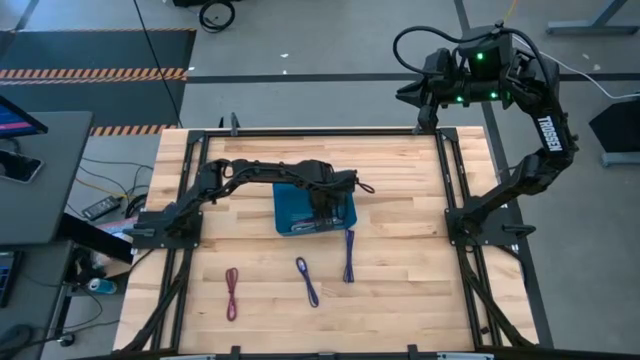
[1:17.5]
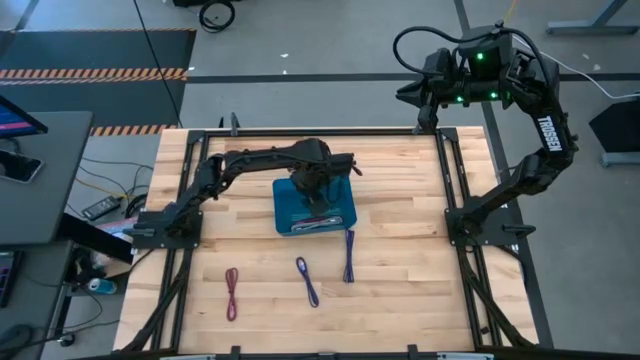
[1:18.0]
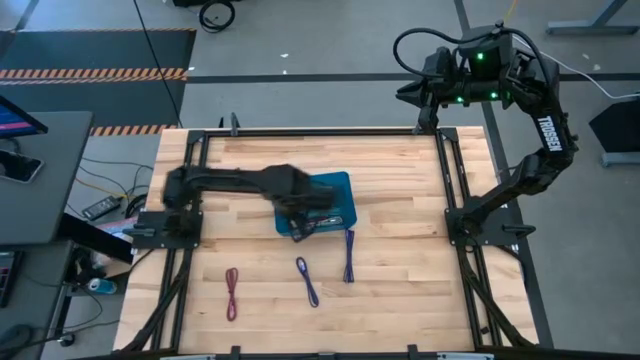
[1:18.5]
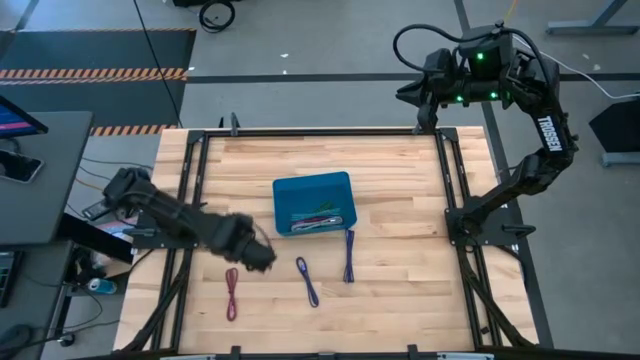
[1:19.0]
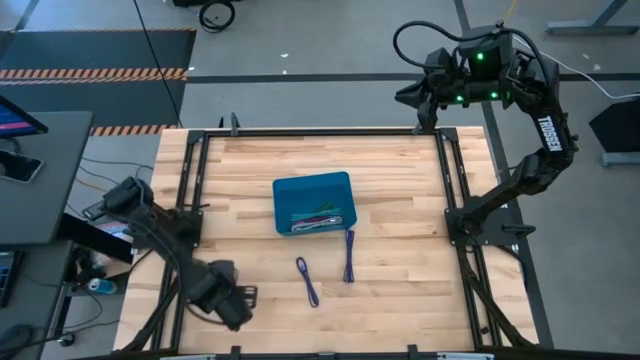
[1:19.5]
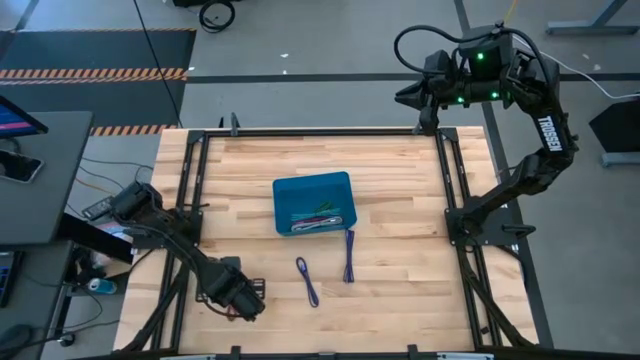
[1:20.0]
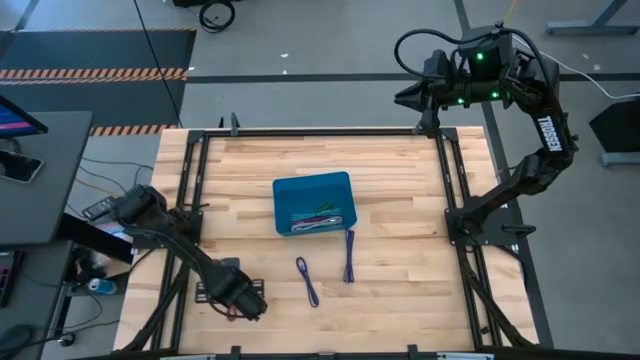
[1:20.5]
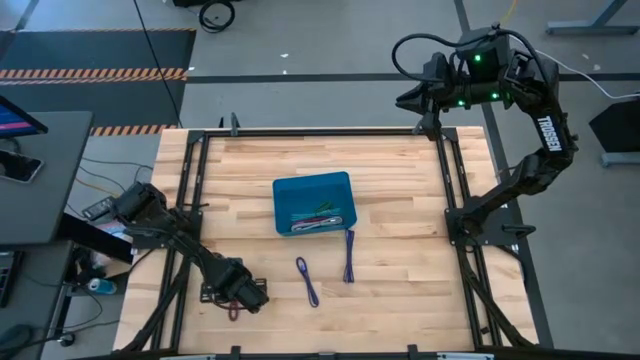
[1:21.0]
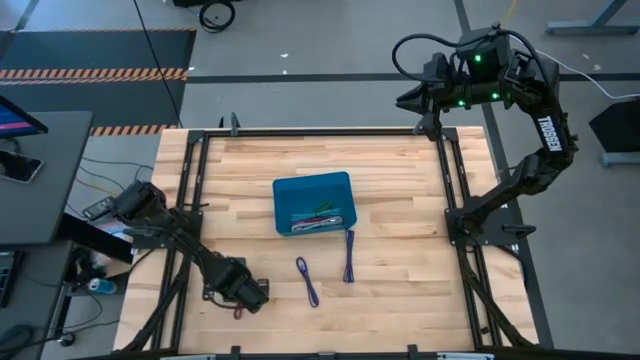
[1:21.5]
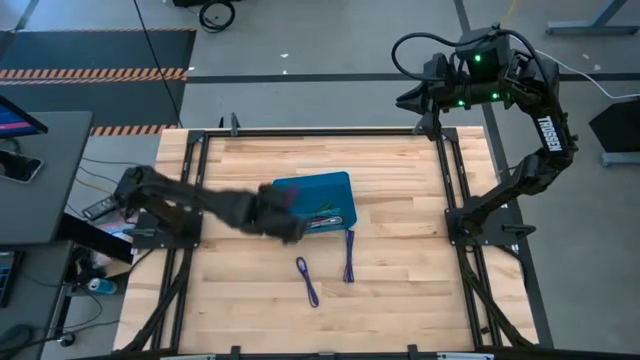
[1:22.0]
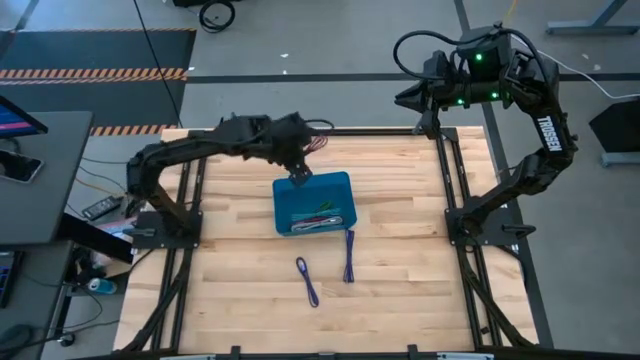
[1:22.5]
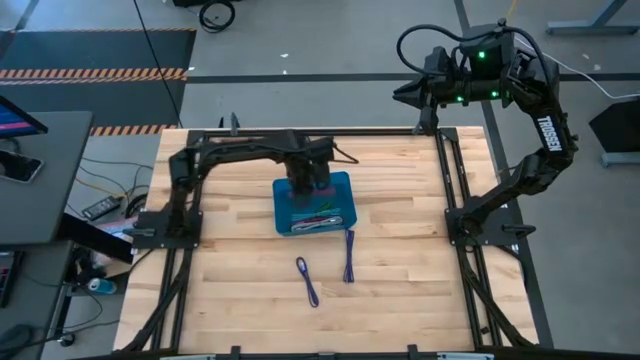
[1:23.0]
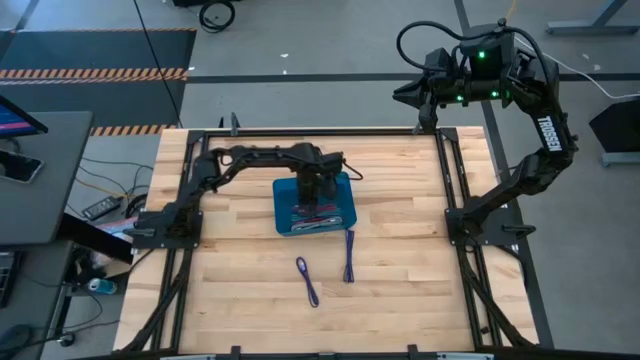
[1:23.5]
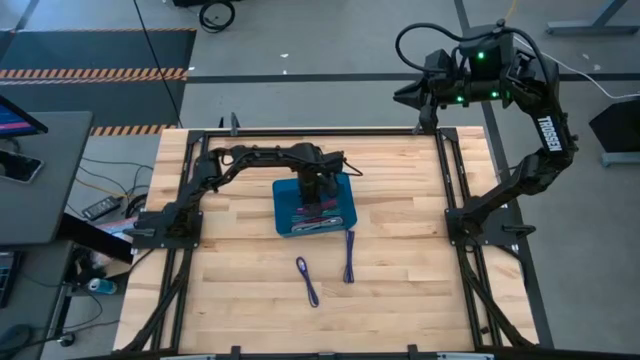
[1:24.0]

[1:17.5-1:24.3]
Task: Pick and place USB-C Cables
Put the black pink charger cable into the blue bin

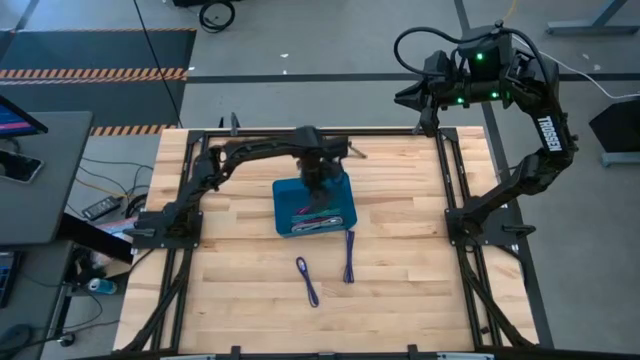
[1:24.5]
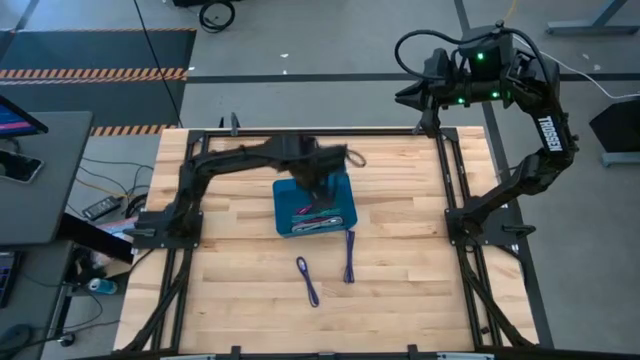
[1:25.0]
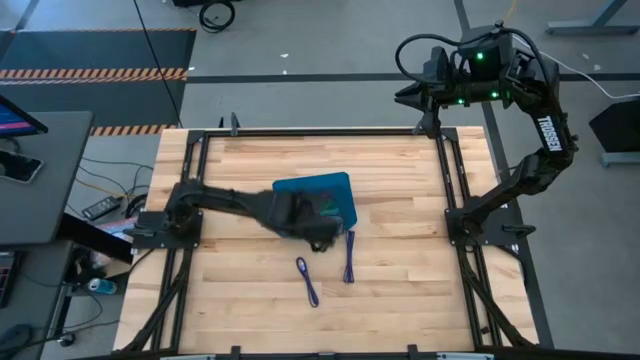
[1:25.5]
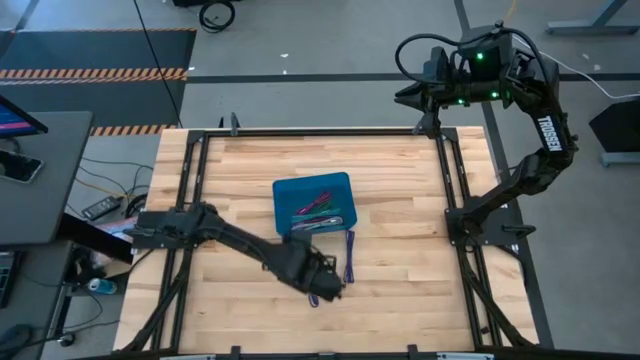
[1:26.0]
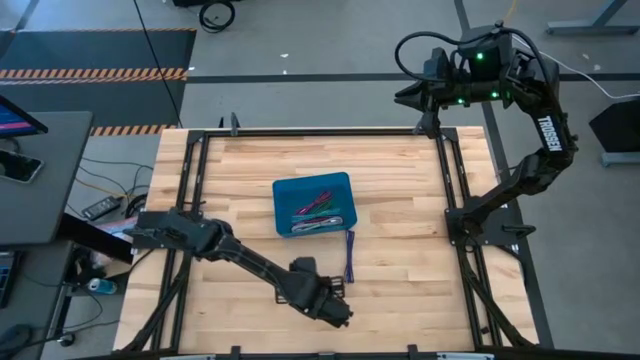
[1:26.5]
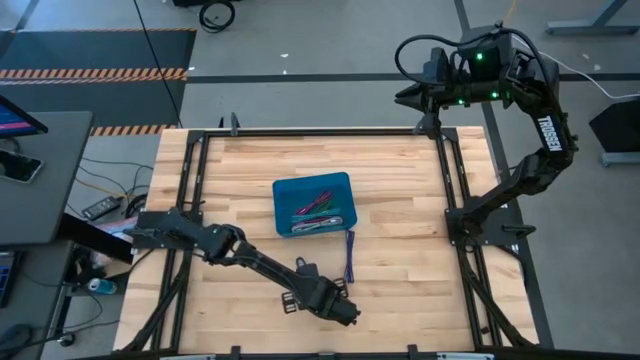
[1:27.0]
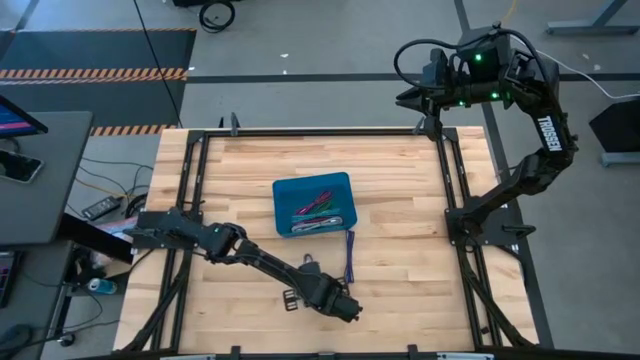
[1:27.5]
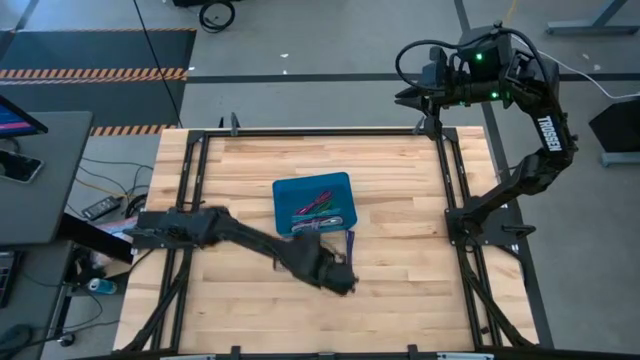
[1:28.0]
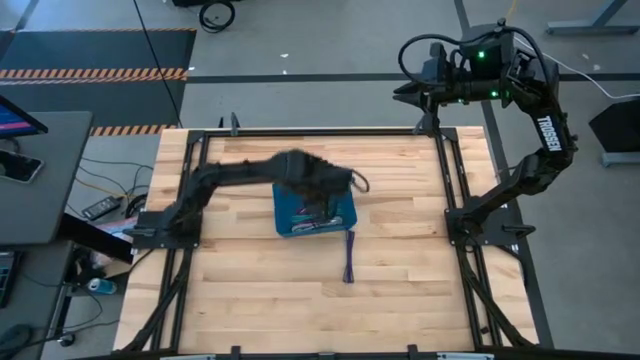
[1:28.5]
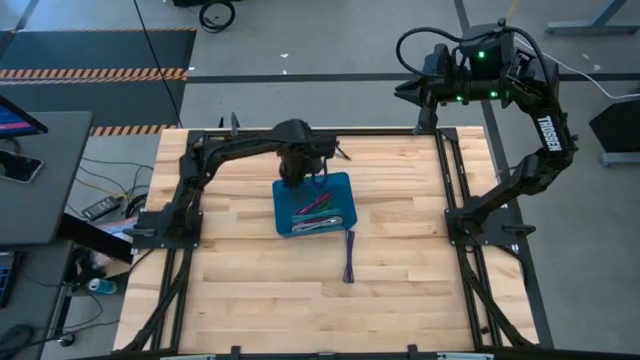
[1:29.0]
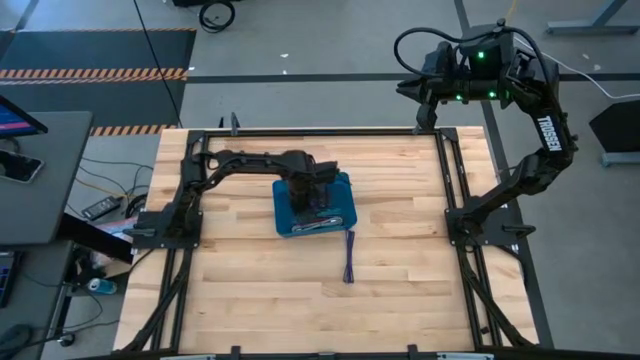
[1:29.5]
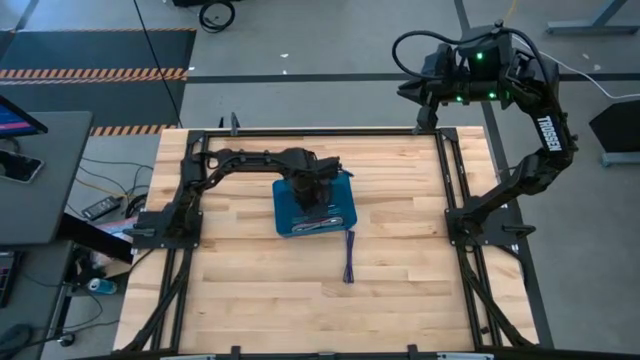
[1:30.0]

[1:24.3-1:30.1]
Put the left black purple charger cable into the blue bin

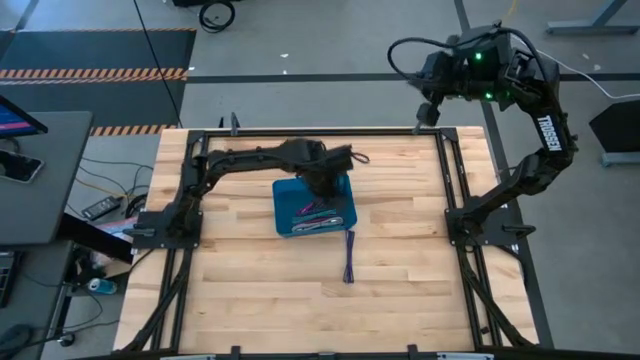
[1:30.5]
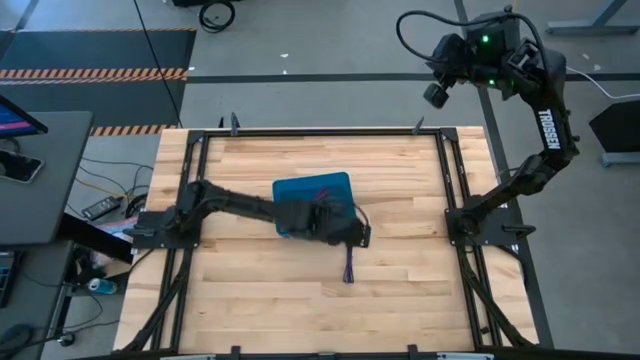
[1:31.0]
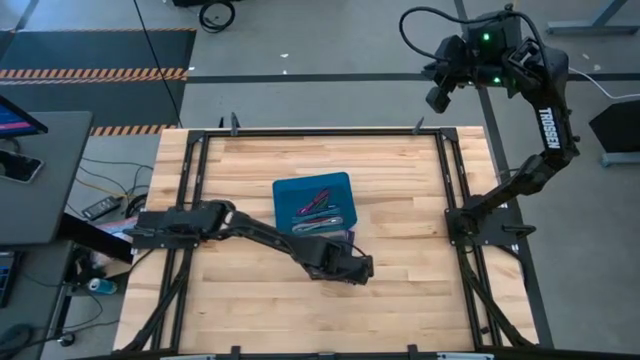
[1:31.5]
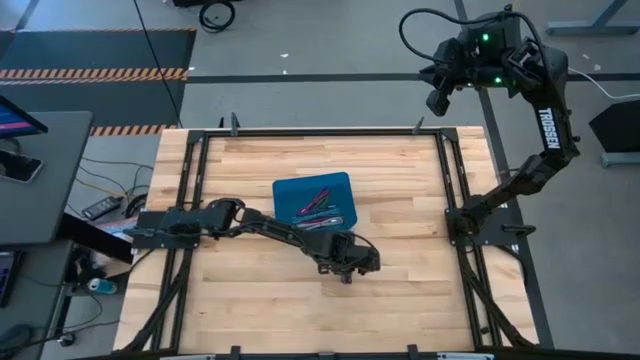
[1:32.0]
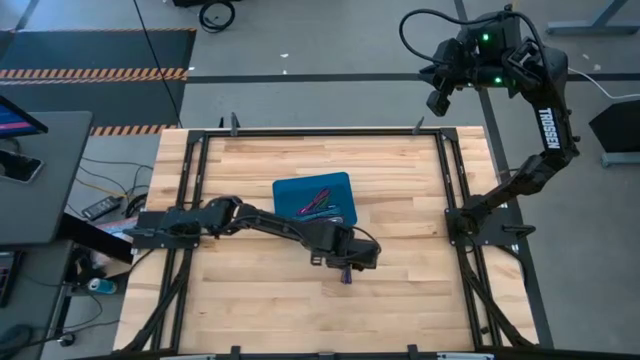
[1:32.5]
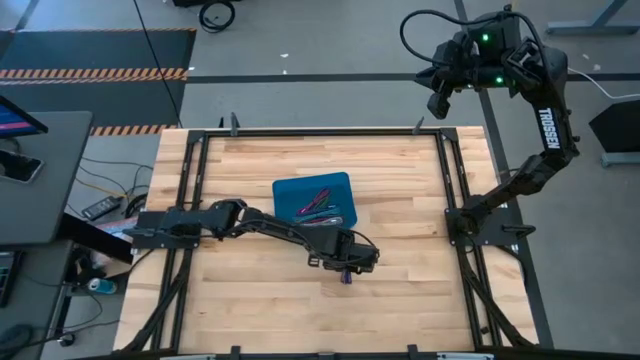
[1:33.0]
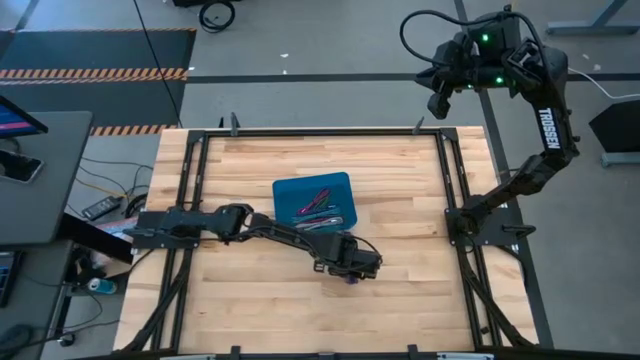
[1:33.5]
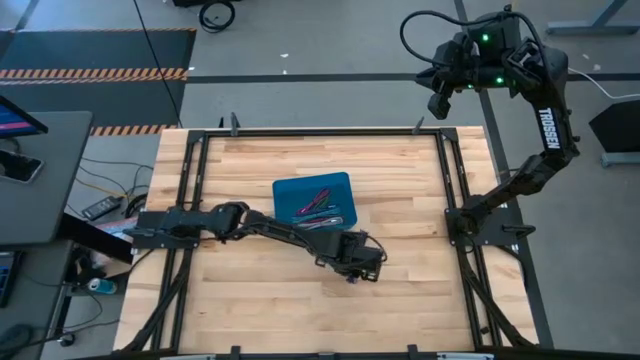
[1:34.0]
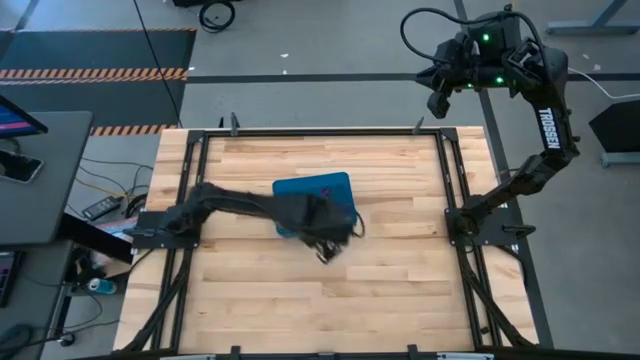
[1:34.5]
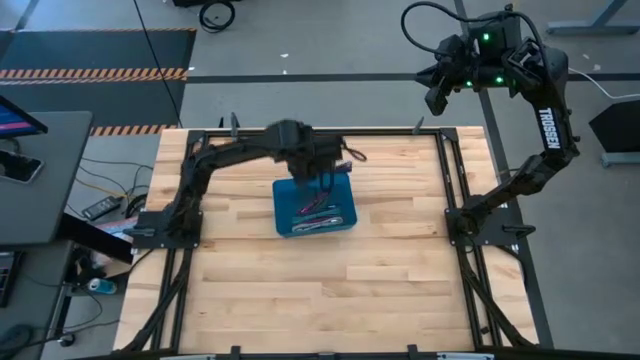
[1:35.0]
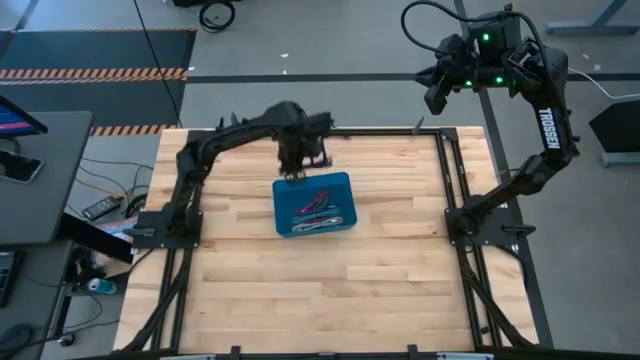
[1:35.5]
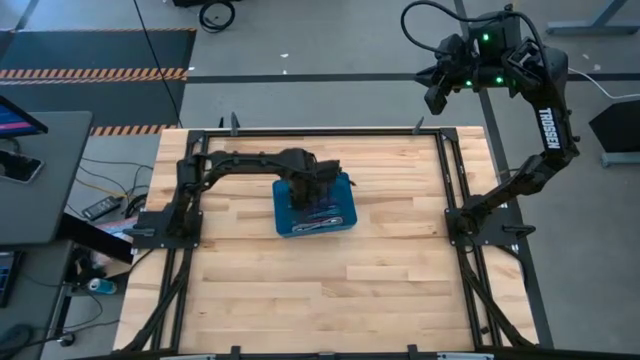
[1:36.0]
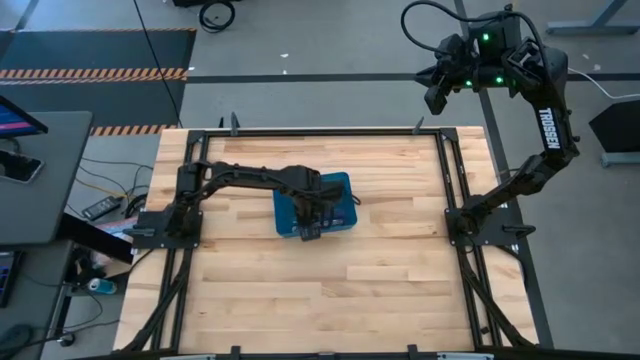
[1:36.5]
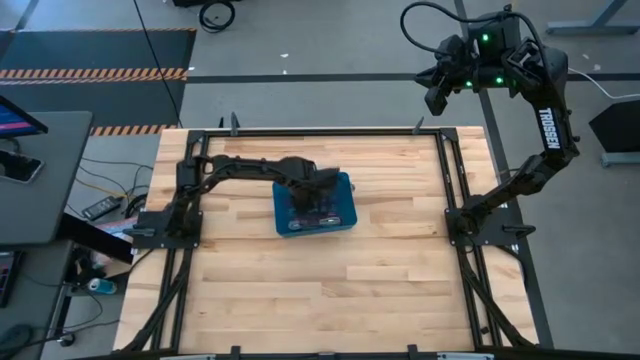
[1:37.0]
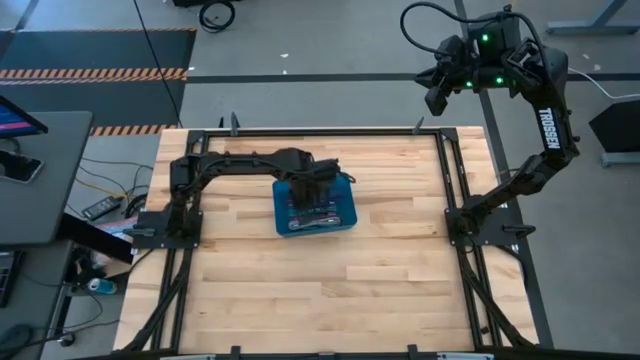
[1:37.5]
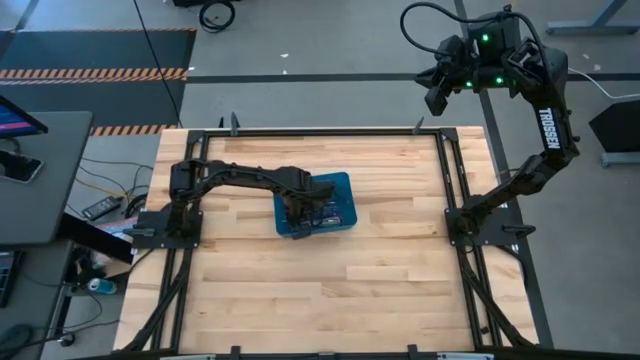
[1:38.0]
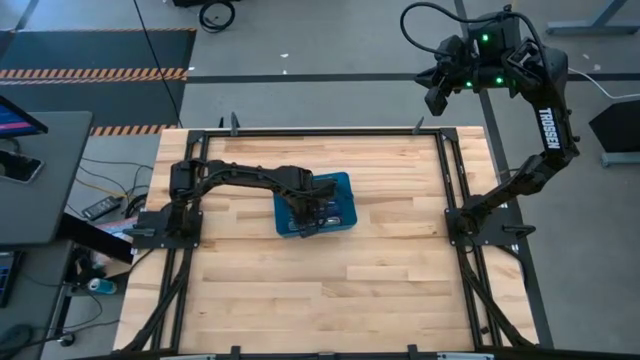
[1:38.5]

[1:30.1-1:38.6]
Put the black purple charger cable into the blue bin
